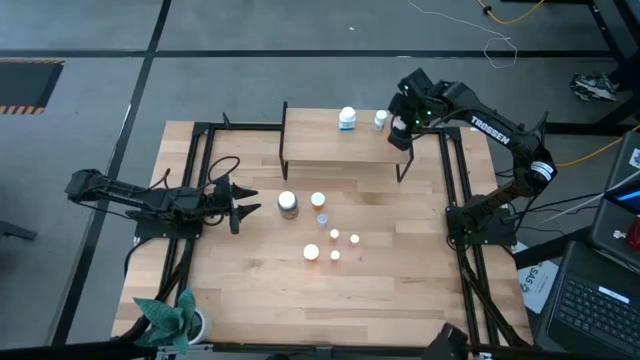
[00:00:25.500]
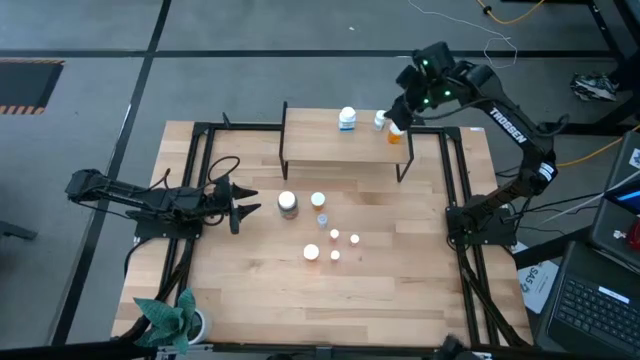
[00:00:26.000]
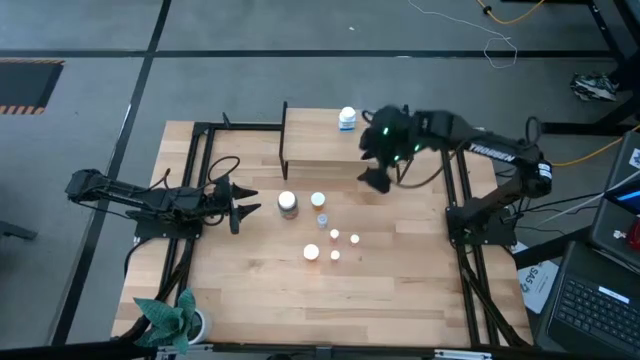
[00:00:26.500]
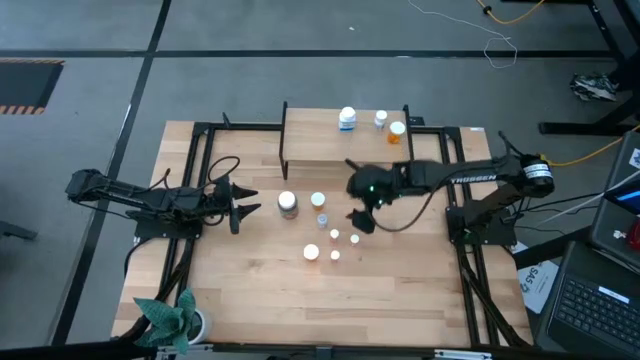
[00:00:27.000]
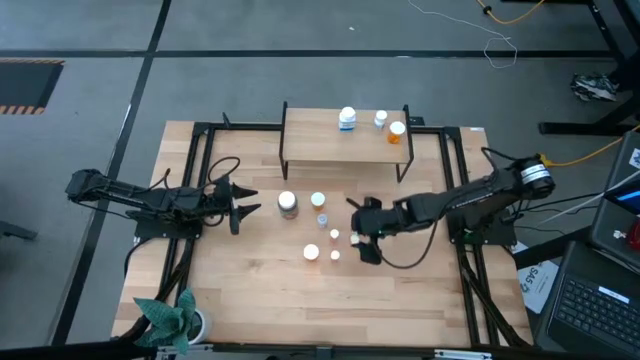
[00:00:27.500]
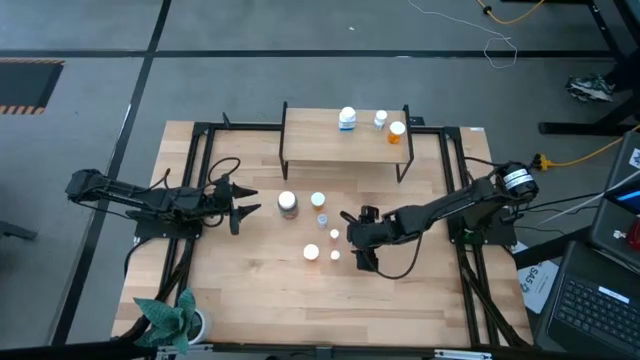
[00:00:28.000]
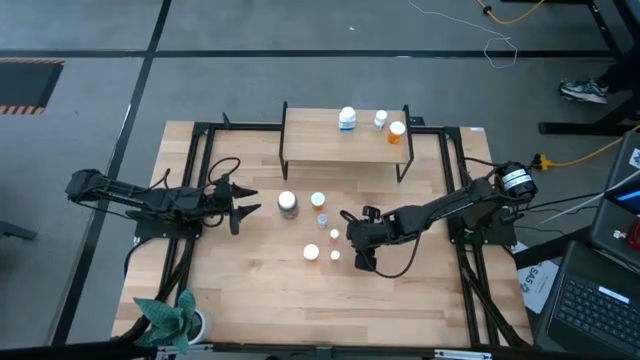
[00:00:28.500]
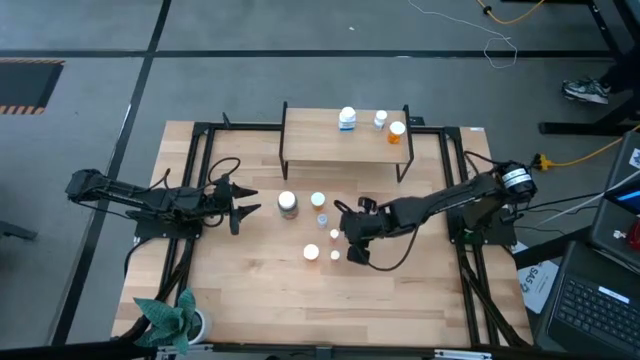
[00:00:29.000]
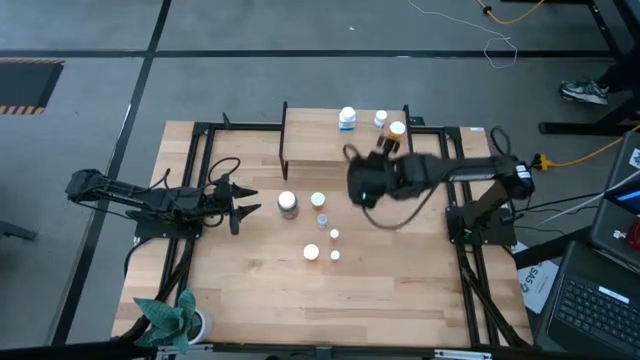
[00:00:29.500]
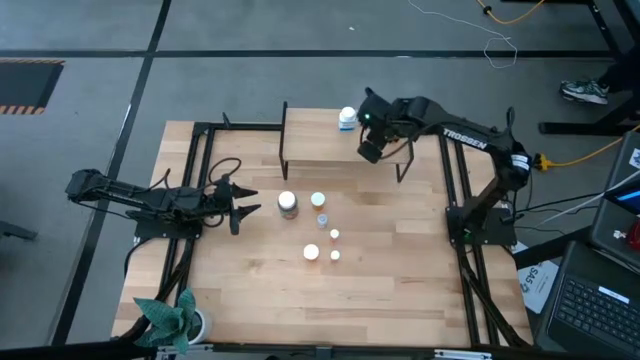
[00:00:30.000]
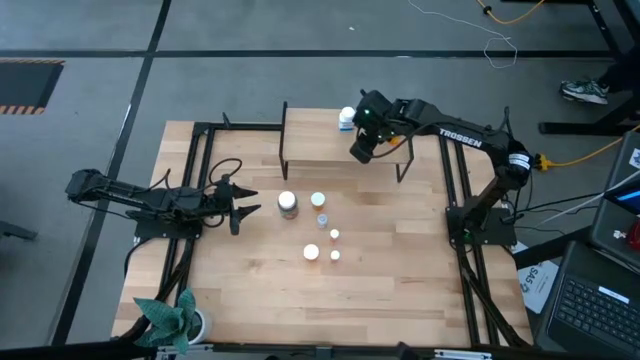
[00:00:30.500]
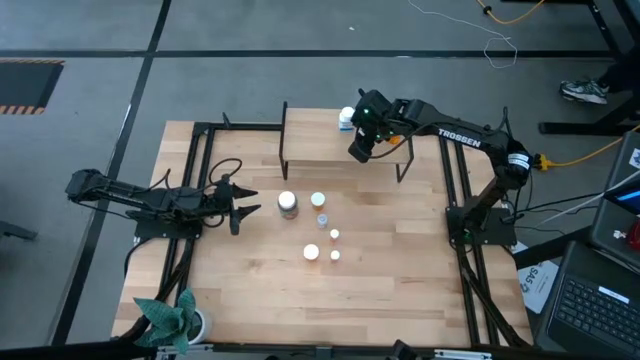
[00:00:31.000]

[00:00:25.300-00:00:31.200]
Task: Pick and place medicine bottles onto shelf by color
Put the top right red pill bottle on the shelf

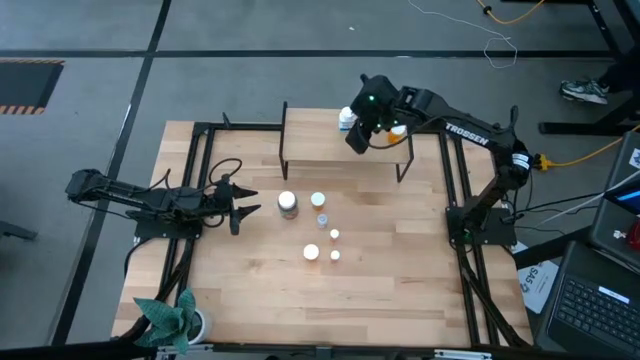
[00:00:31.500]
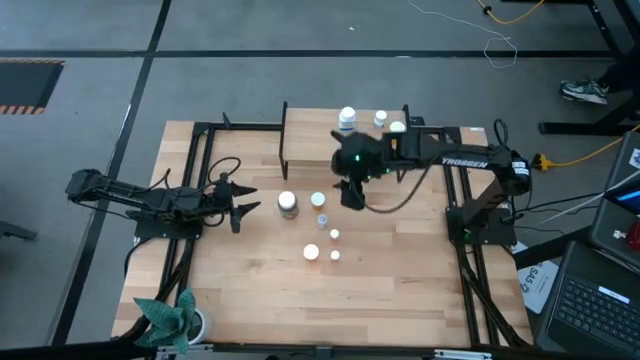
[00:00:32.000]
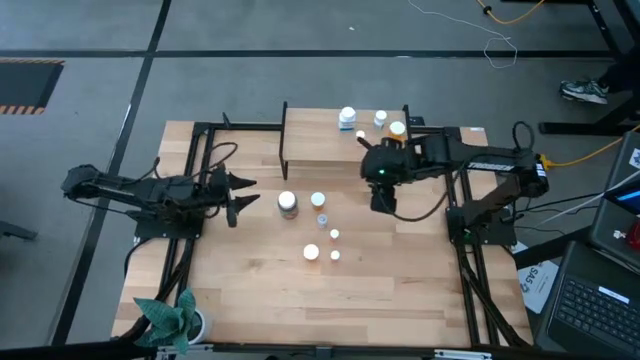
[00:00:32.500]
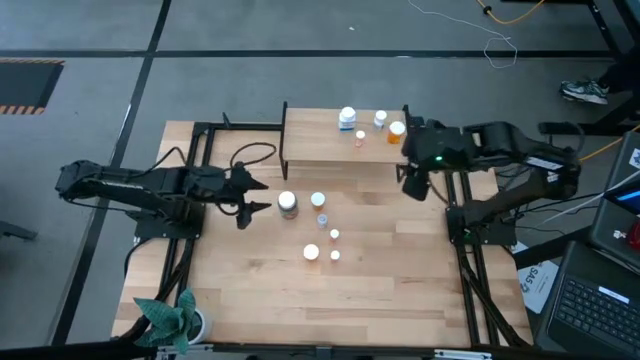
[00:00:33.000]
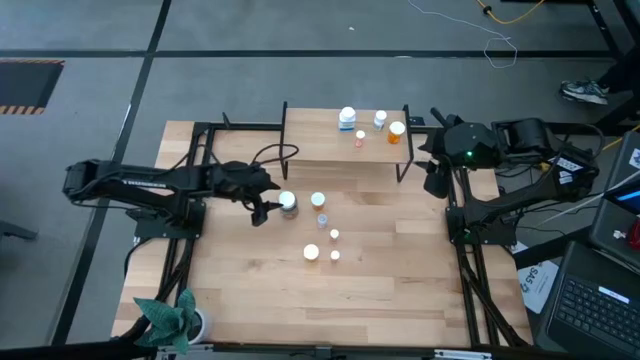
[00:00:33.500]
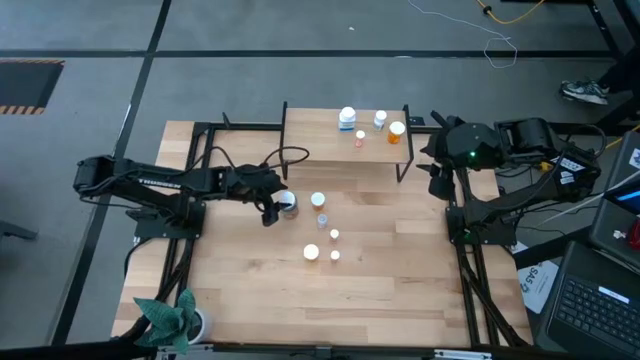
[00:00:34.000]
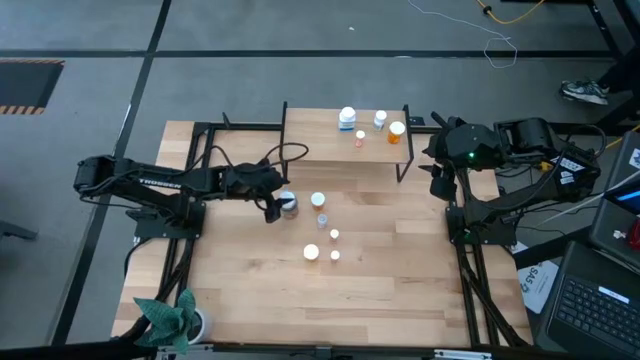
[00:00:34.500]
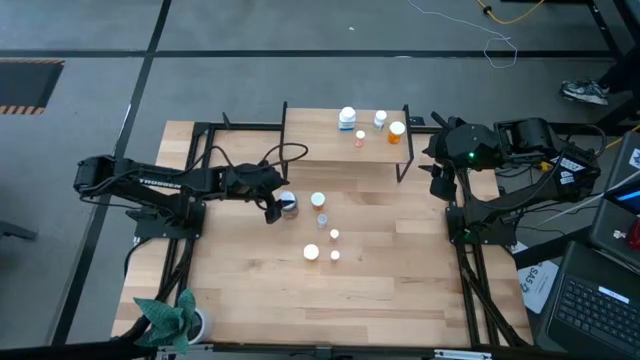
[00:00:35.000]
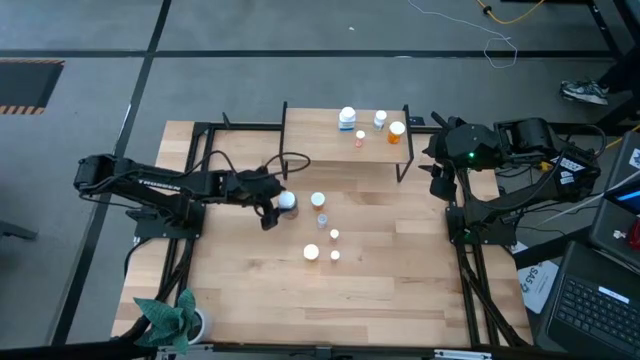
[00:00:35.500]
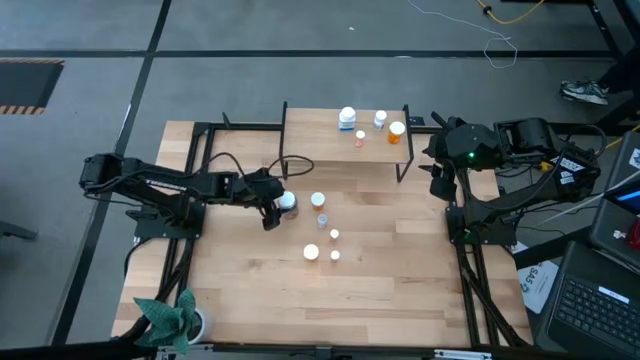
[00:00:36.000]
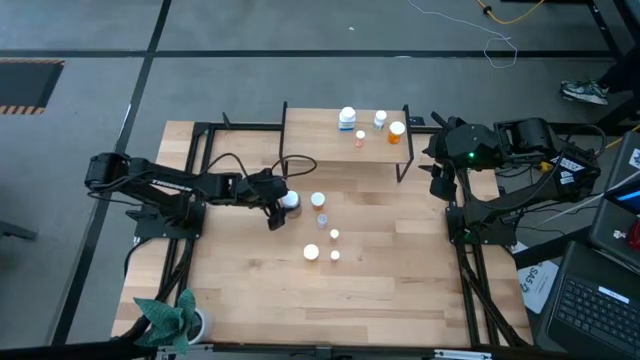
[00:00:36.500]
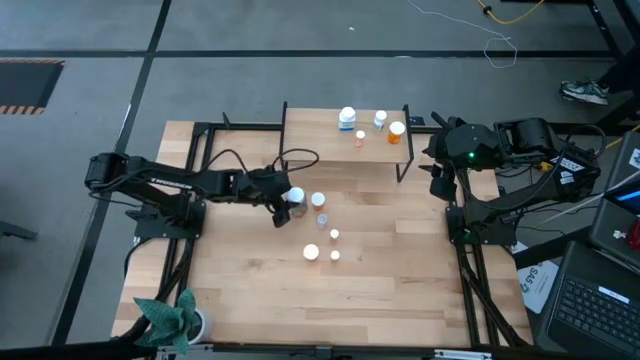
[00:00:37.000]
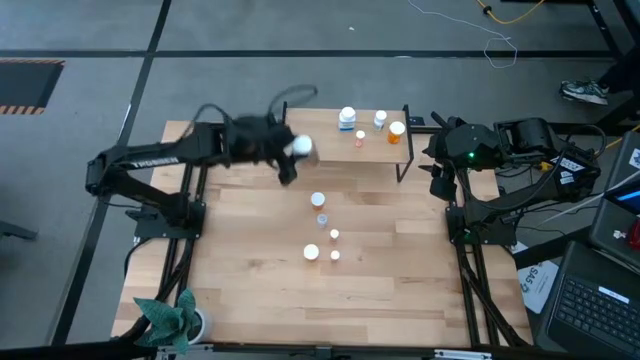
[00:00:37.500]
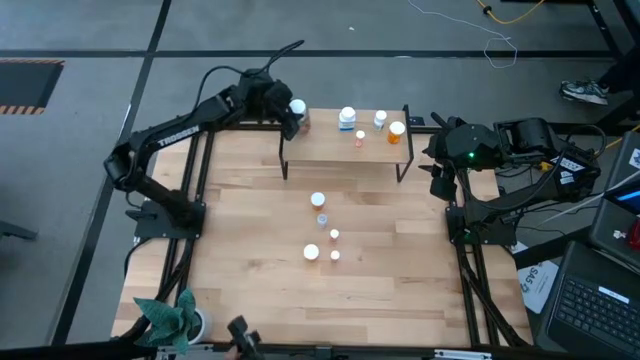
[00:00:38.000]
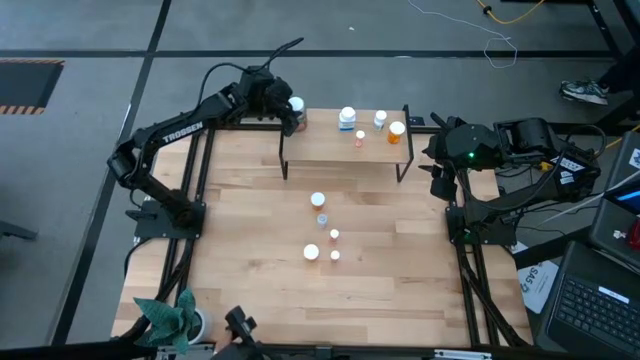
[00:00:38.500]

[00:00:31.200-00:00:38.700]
Put the green pill bottle on the shelf

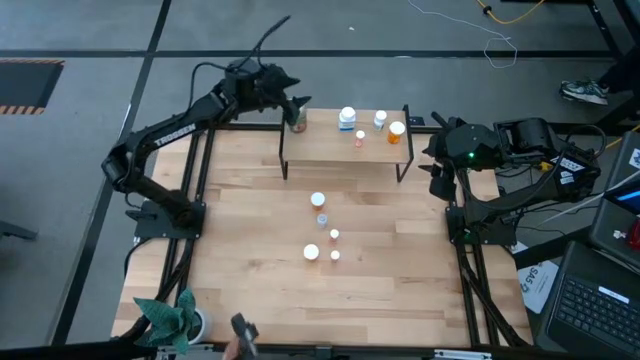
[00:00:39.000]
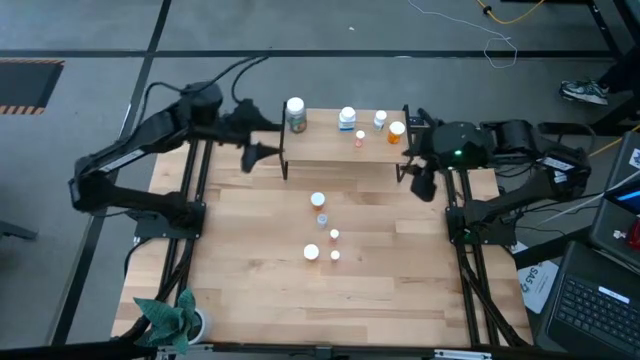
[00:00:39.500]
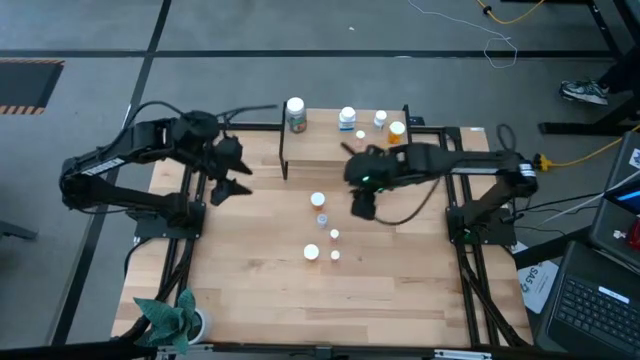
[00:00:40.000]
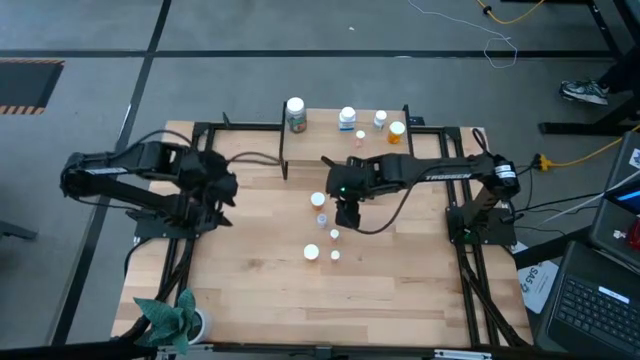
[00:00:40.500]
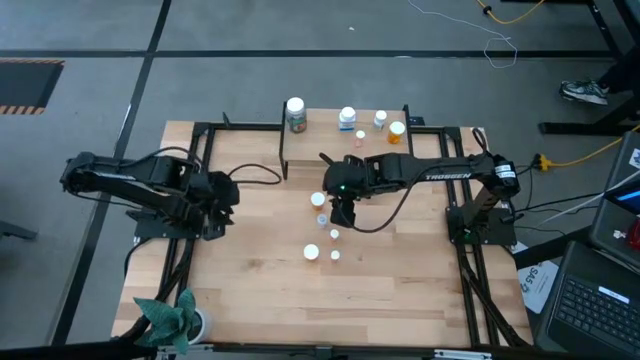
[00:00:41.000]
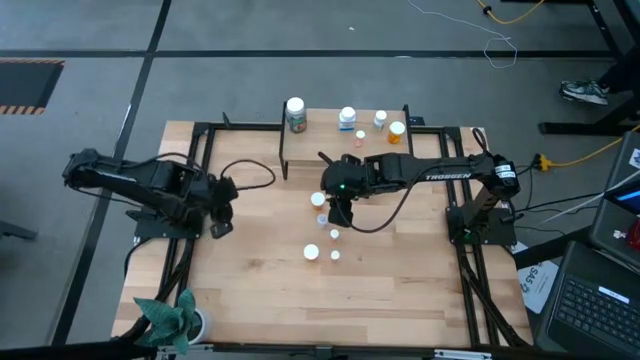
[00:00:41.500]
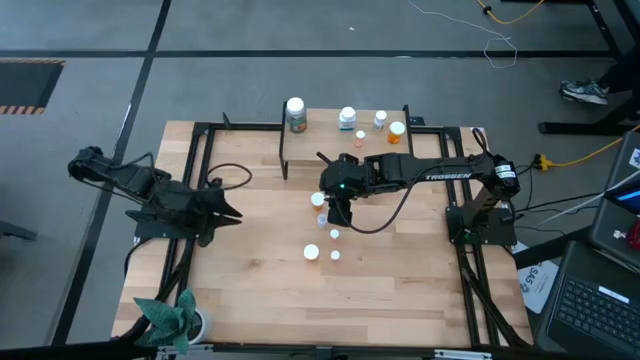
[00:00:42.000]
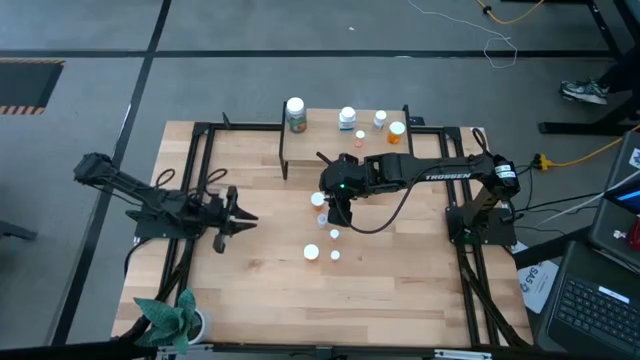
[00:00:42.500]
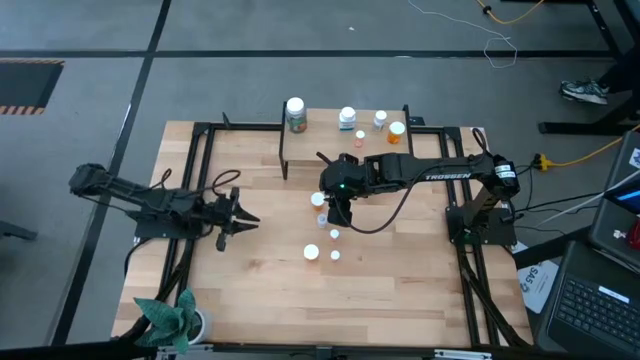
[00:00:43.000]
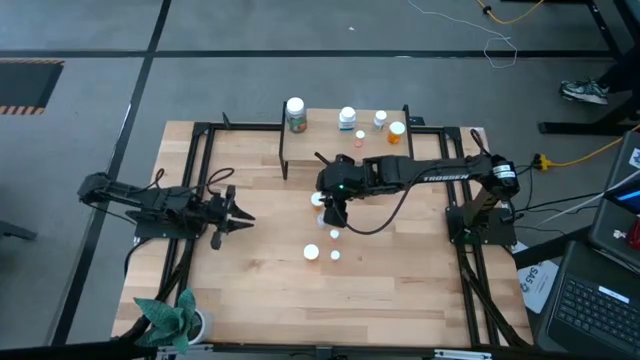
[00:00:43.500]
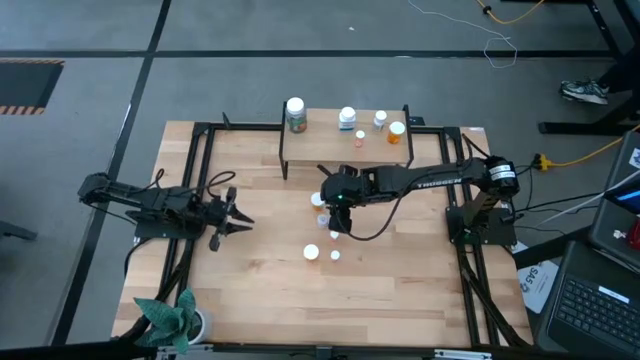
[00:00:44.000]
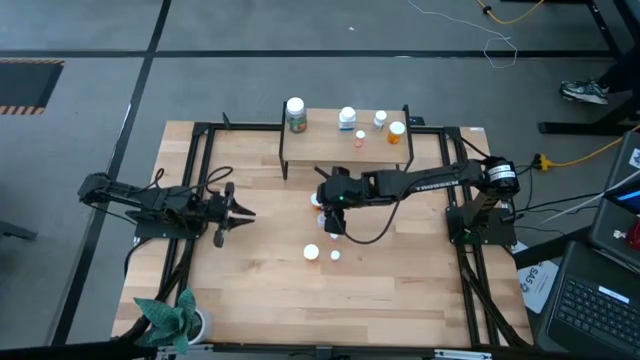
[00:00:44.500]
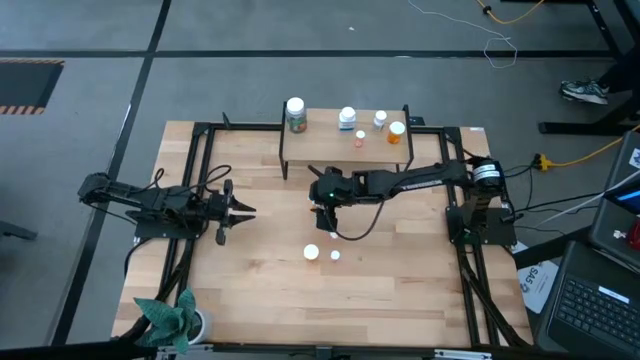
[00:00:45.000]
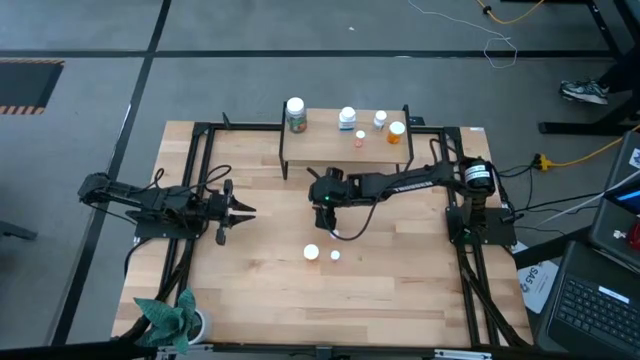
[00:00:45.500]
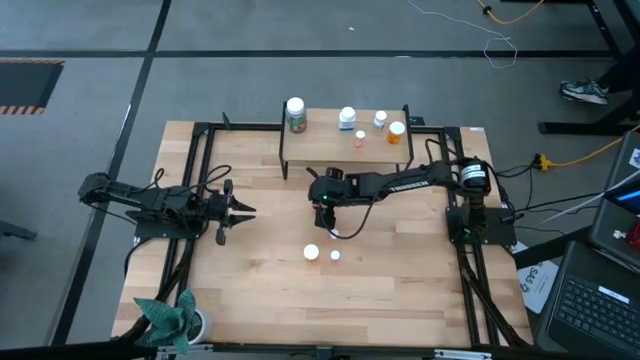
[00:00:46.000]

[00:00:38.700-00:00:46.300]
Put the top orange pill bottle on the shelf
